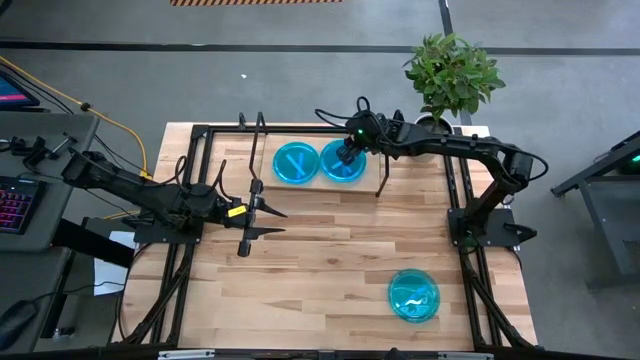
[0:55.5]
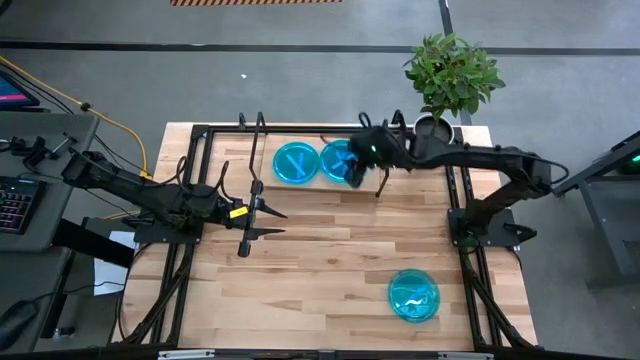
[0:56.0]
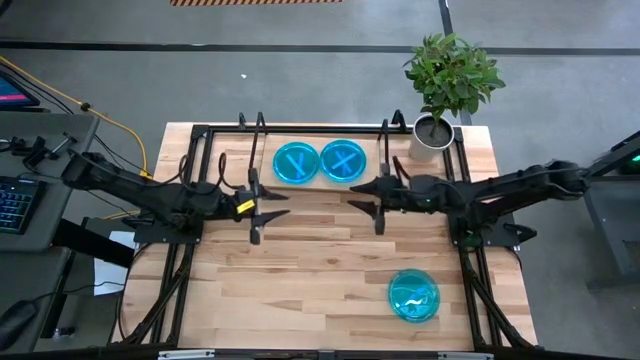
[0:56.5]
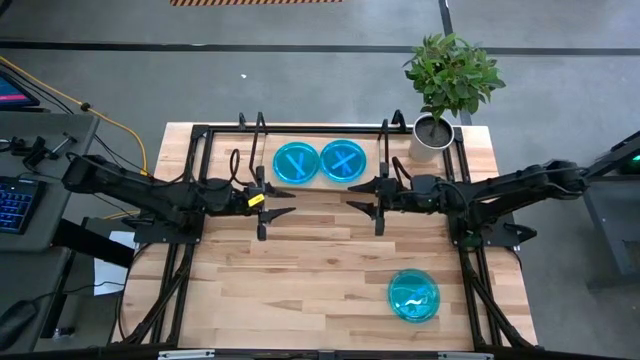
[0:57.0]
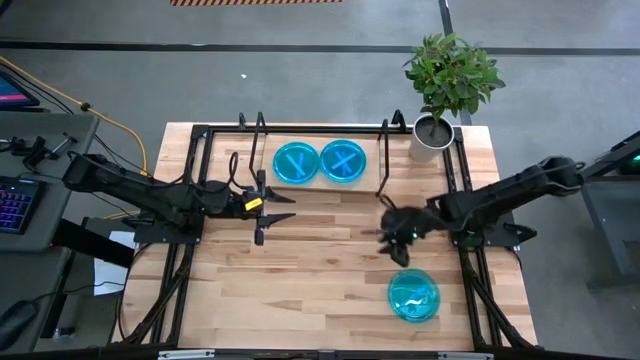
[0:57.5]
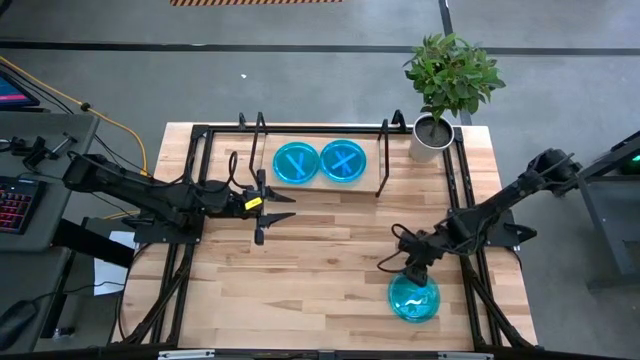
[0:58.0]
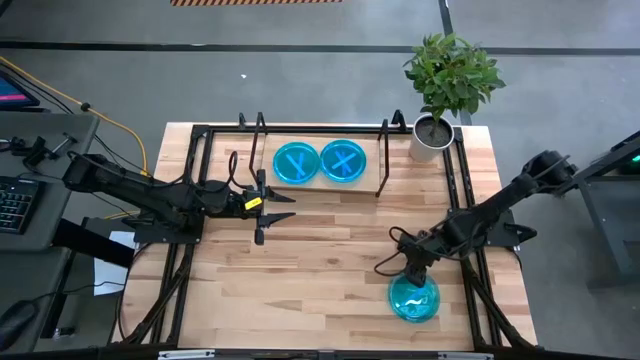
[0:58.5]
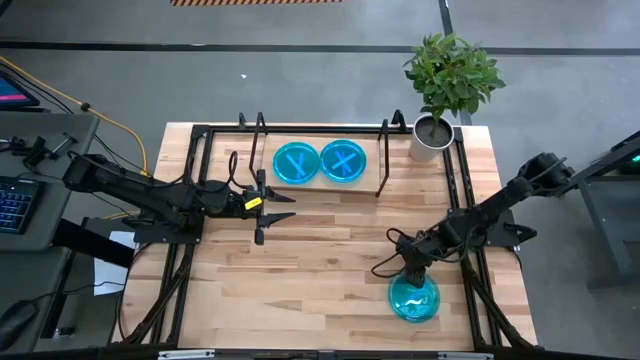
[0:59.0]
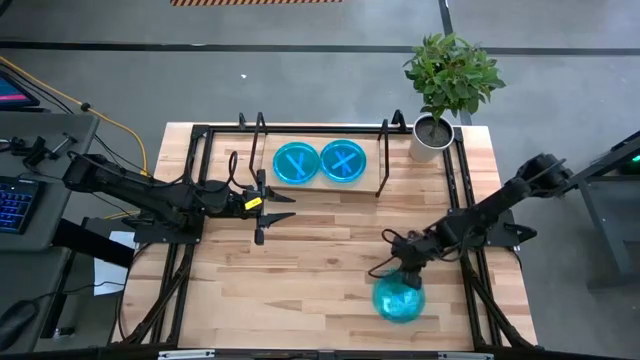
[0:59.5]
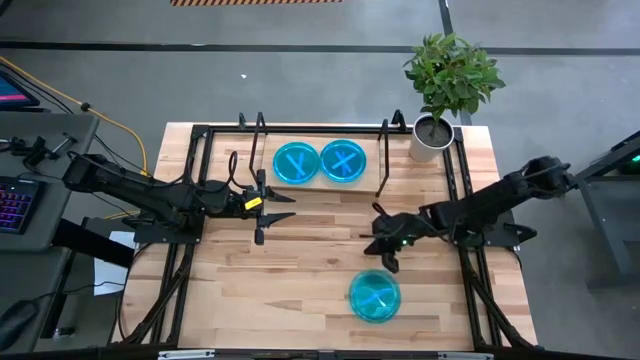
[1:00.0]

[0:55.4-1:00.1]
Task: Place and stack plates onto a shelf
Stack the blue plate on top of the blue plate on the shelf

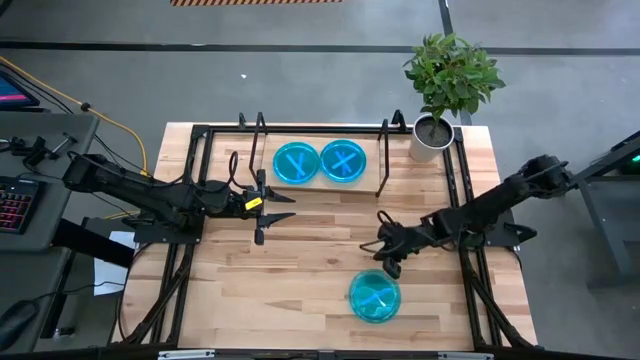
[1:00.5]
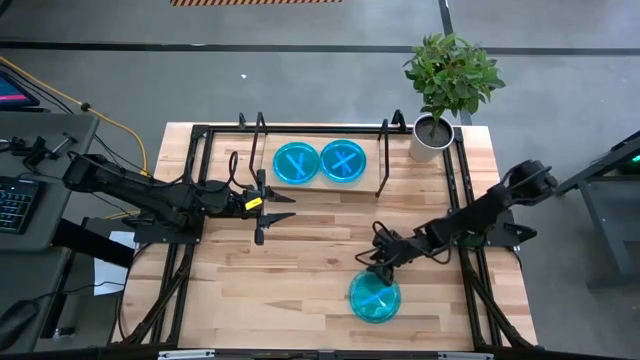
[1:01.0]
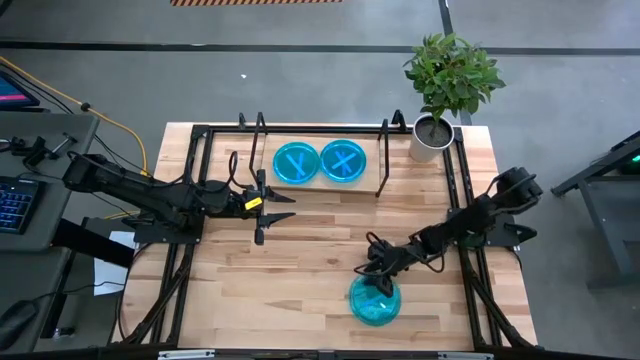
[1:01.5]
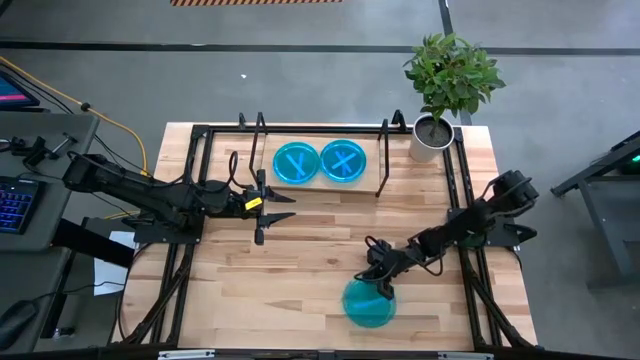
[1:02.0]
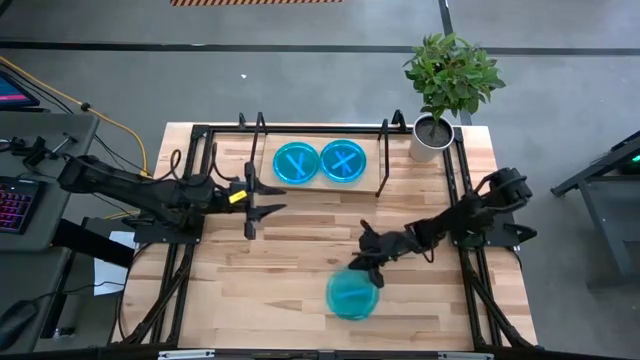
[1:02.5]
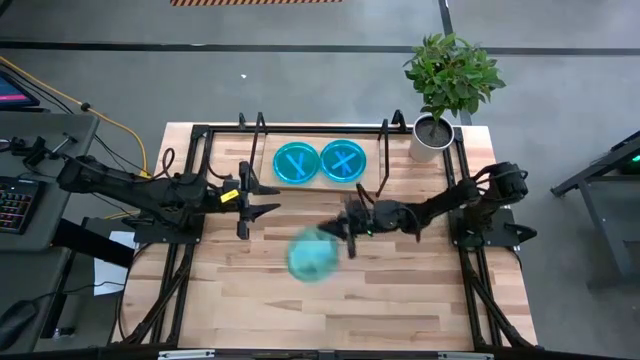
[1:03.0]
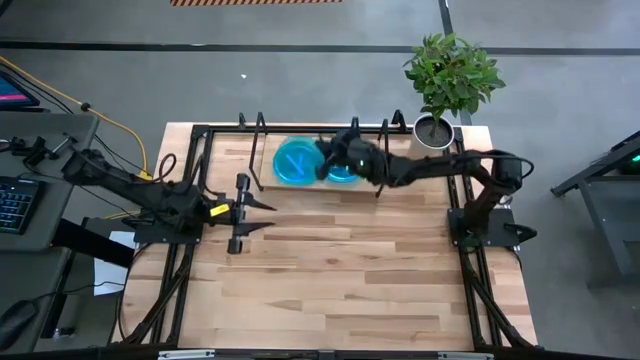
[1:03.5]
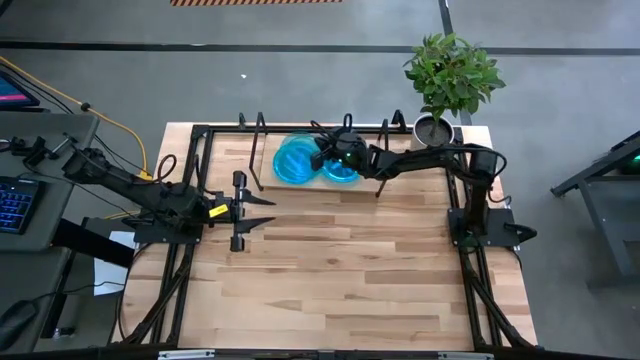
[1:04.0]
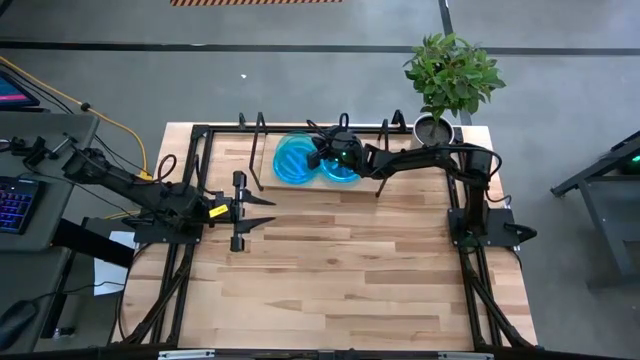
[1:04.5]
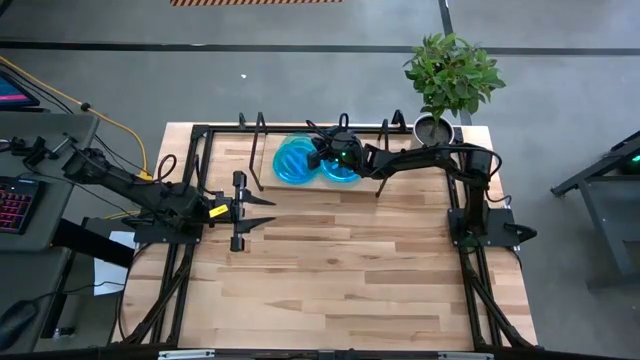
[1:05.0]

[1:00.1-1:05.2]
Stack the blue plate on top of the blue plate on the shelf

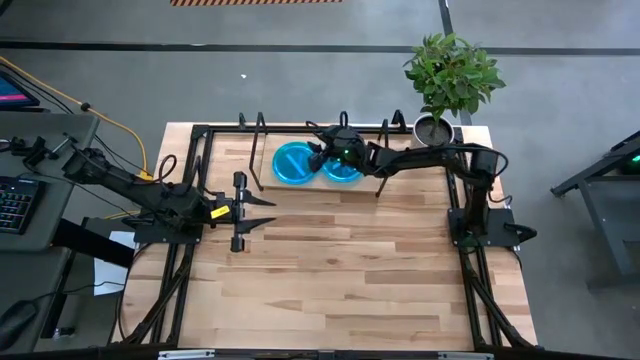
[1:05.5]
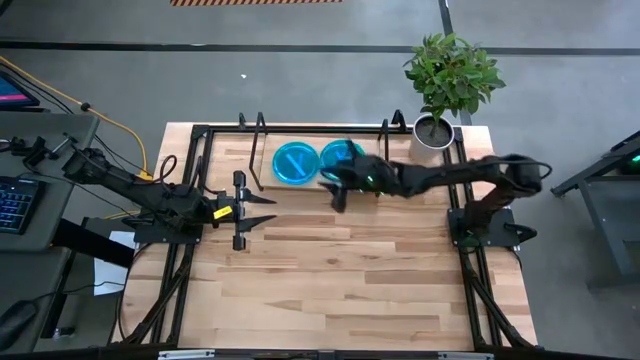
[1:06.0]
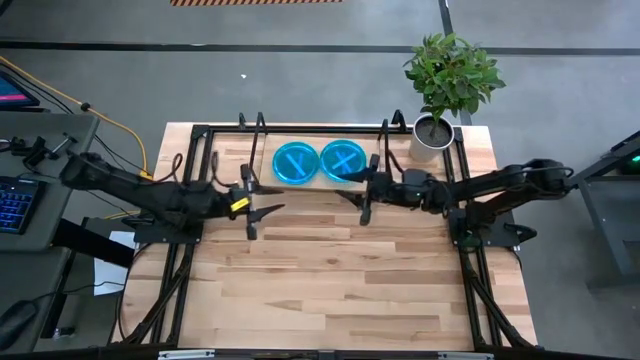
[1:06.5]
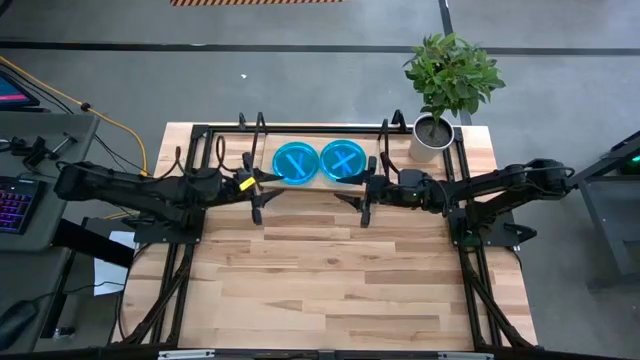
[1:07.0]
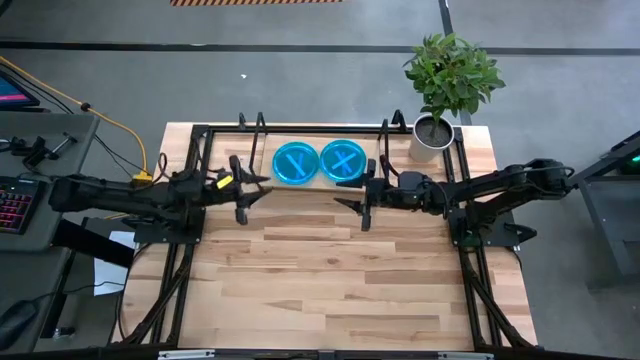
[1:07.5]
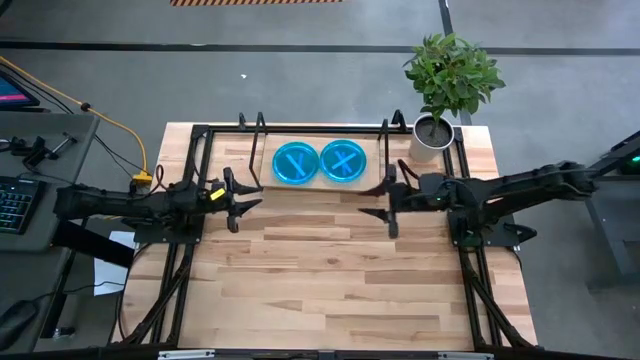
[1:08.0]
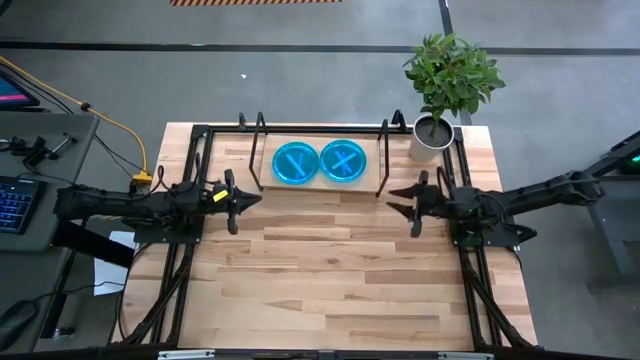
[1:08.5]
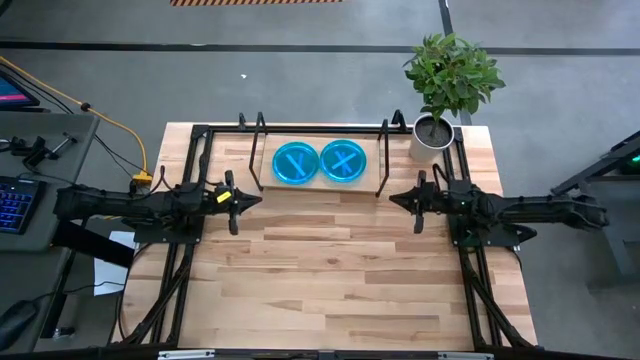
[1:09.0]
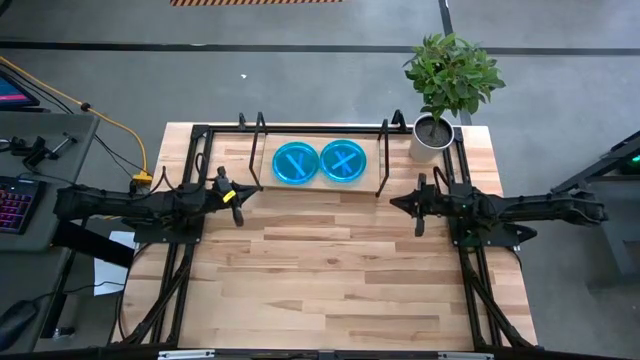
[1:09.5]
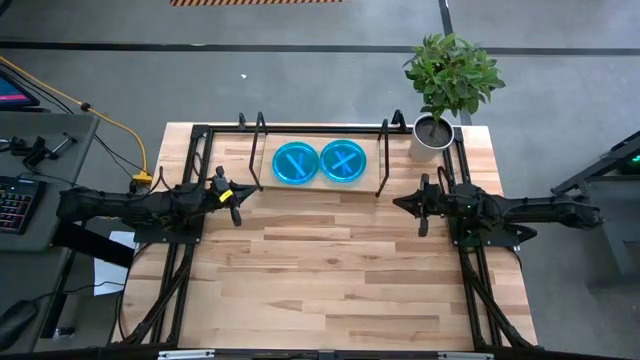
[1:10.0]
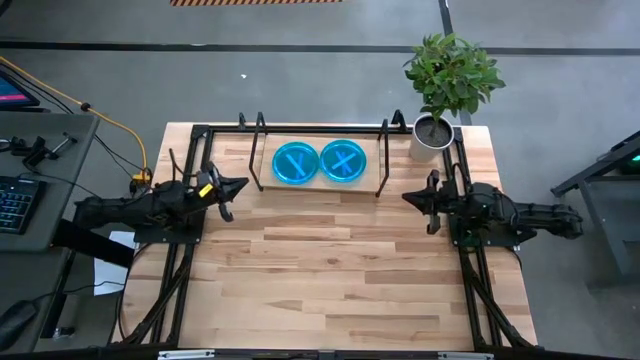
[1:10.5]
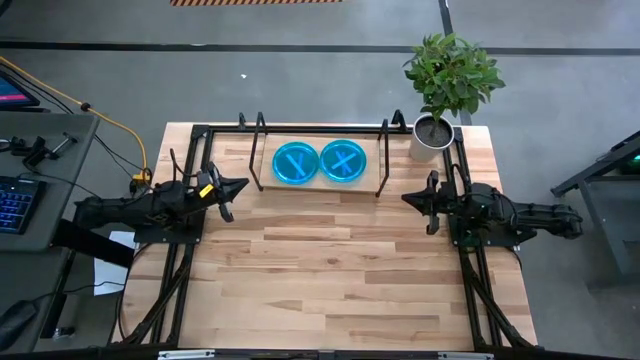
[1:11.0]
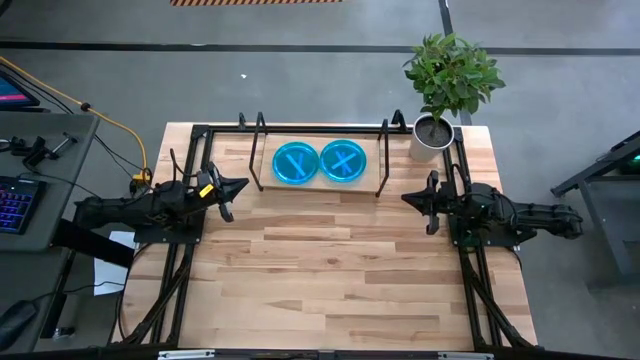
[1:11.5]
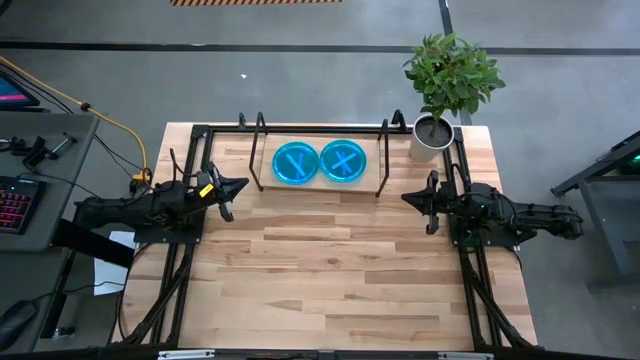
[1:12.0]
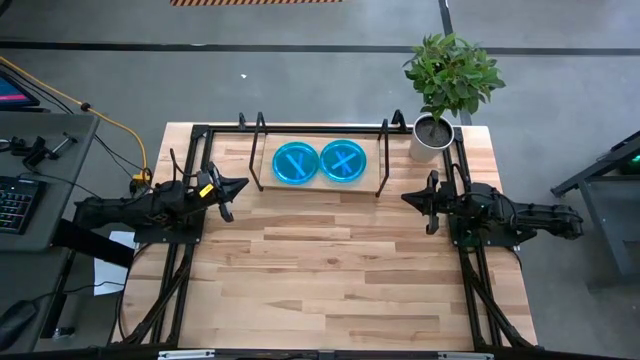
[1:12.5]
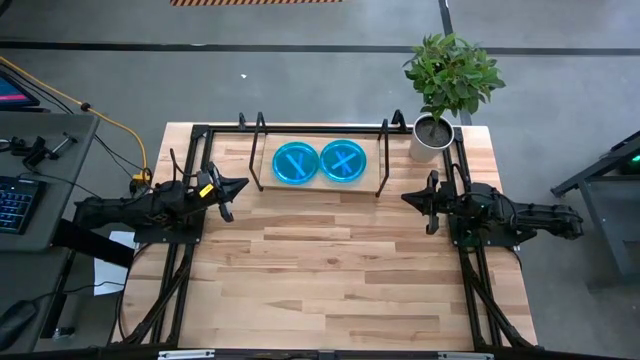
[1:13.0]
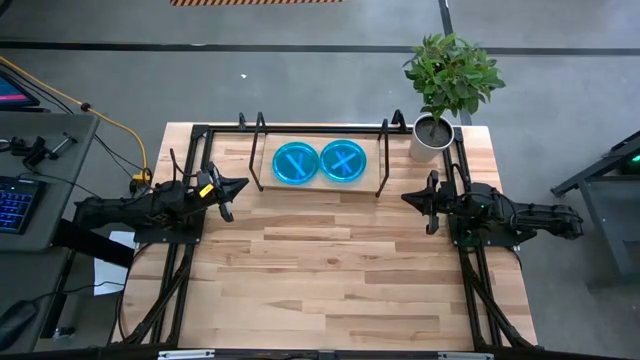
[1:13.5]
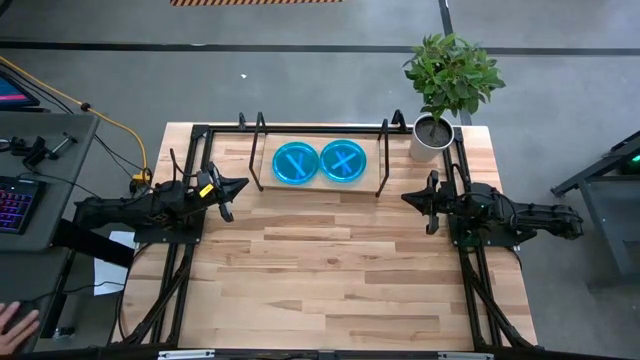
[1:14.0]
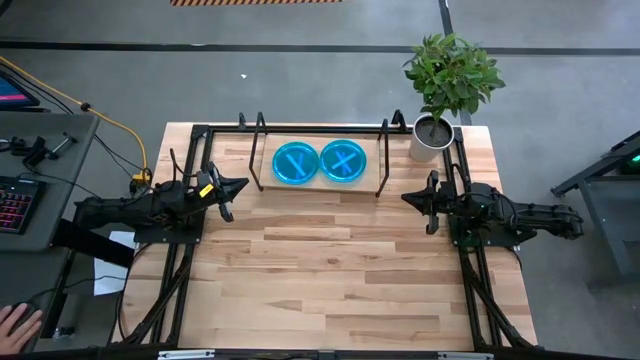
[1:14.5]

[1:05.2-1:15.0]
Return to Home Position

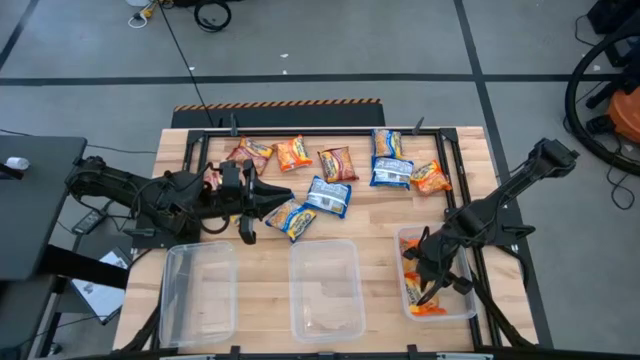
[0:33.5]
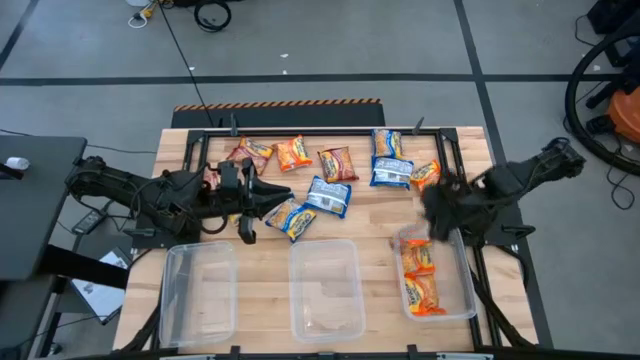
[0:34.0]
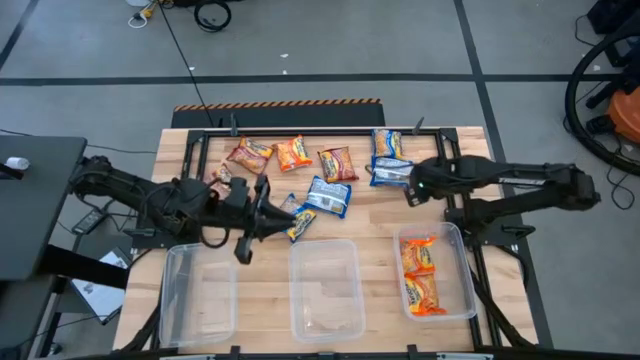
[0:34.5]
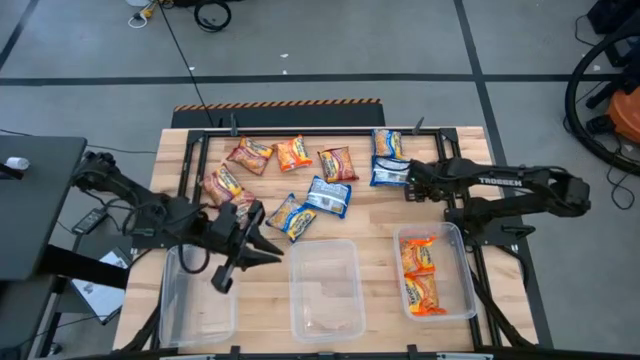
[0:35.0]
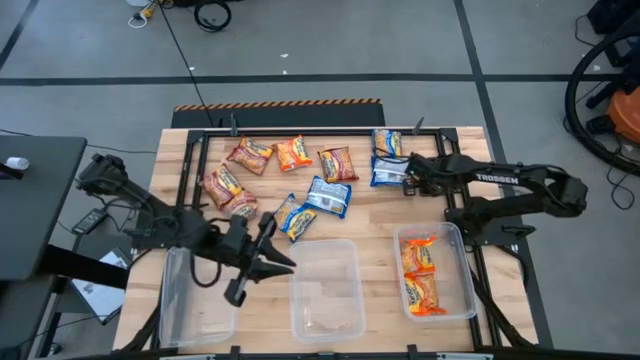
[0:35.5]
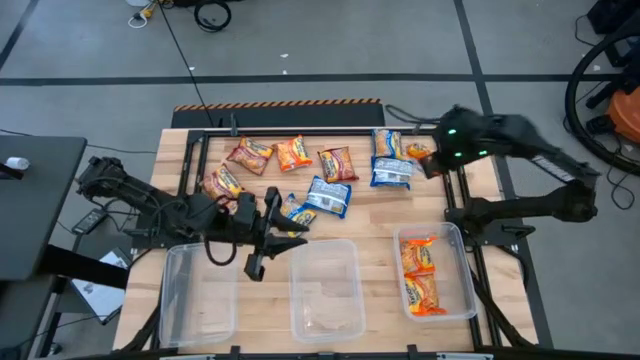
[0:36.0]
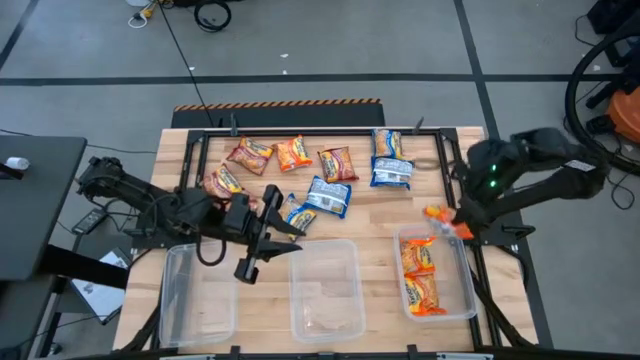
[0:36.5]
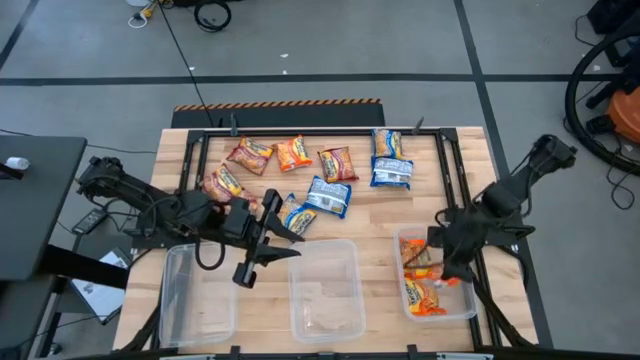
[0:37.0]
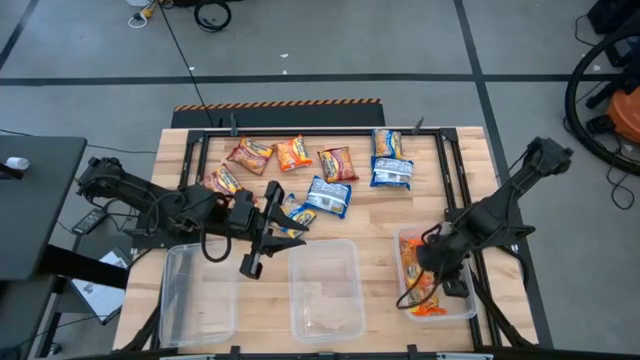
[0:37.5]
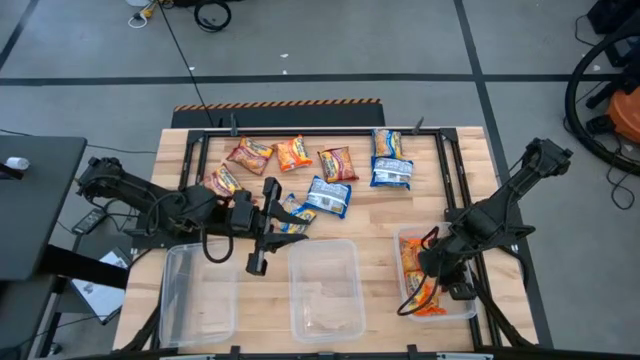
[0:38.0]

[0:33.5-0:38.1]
Task: Sort Maruchan noodles
Put the right orange noodle pack into the right transparent bin
